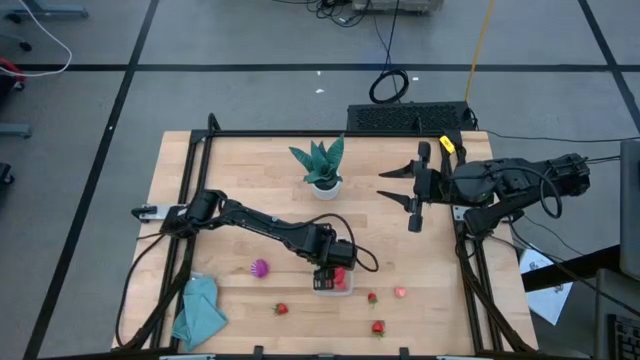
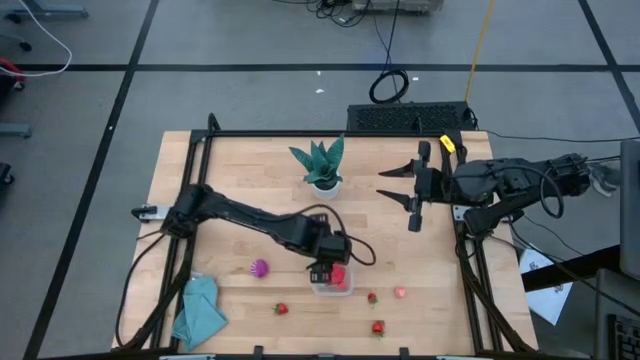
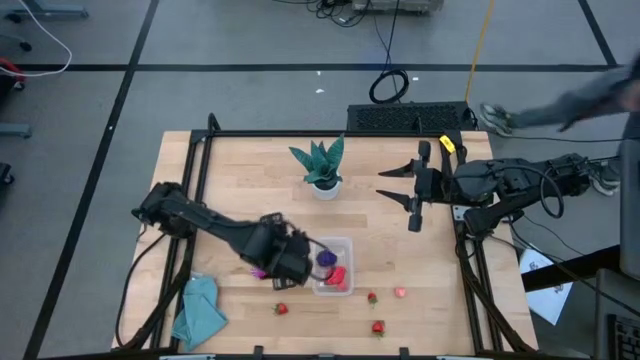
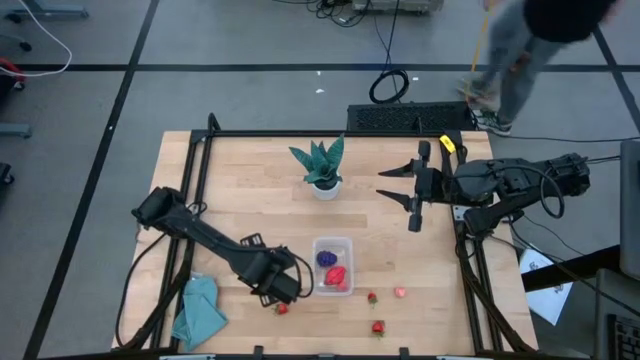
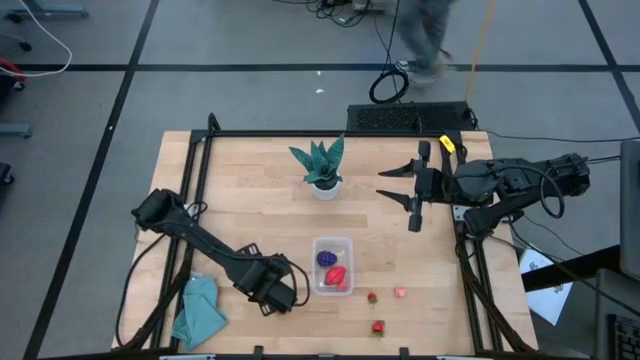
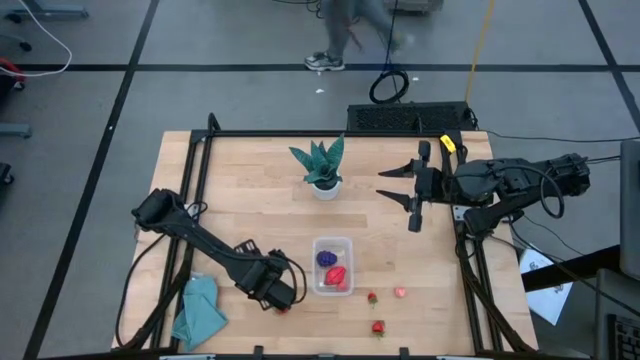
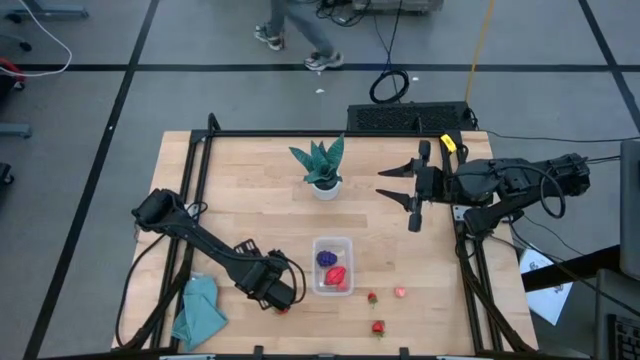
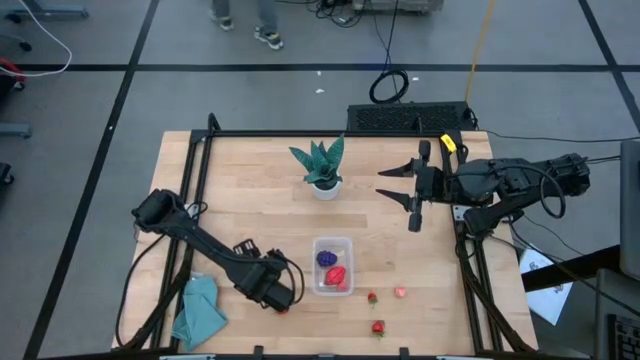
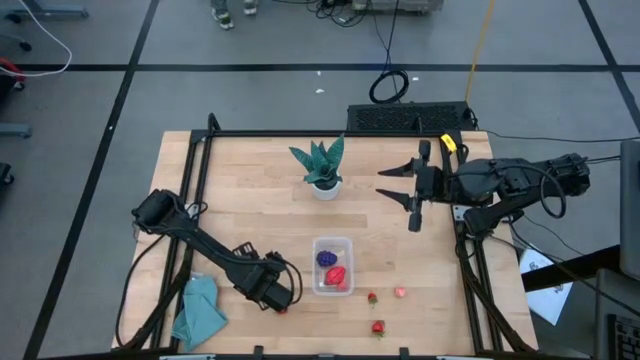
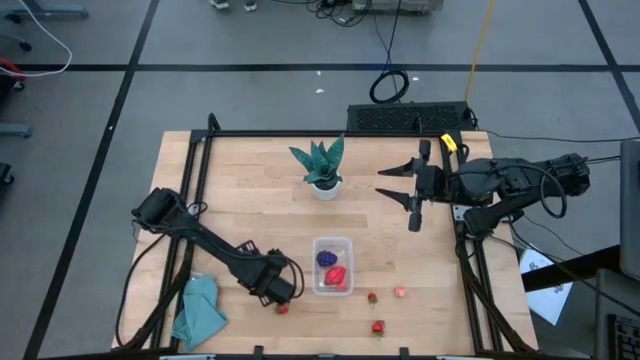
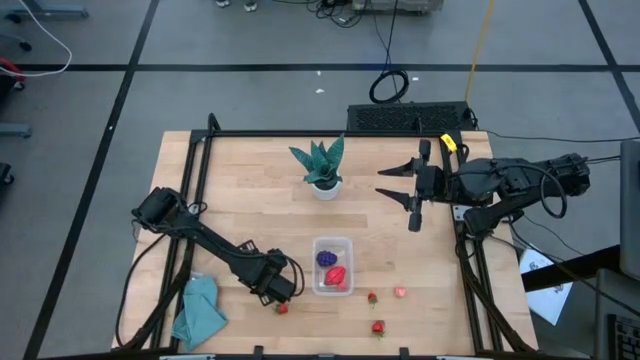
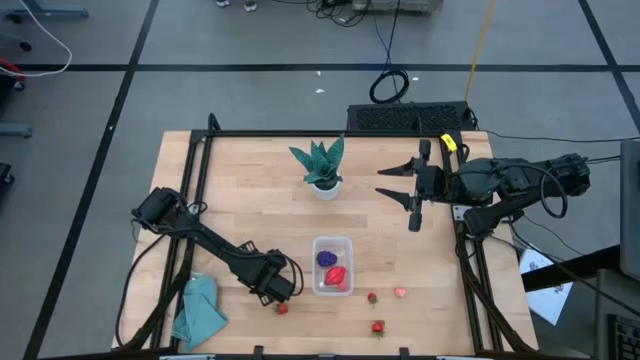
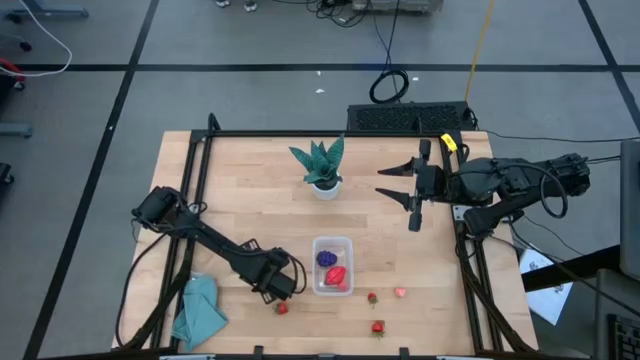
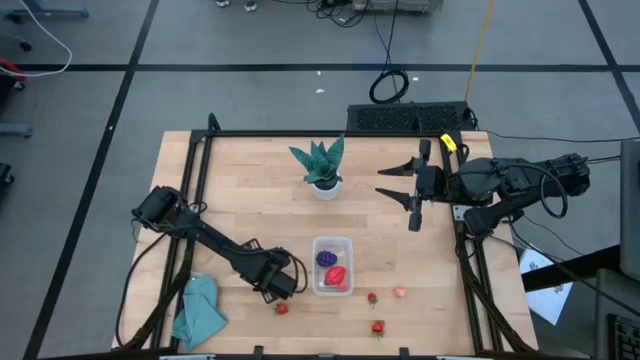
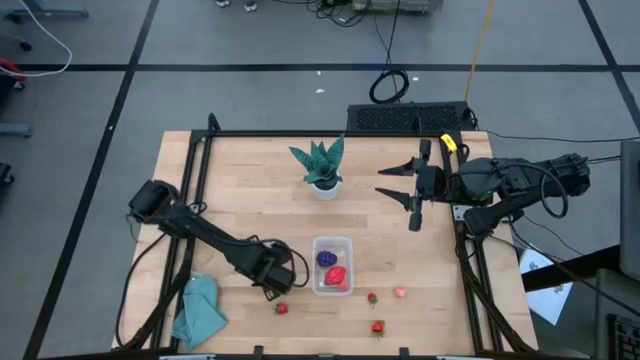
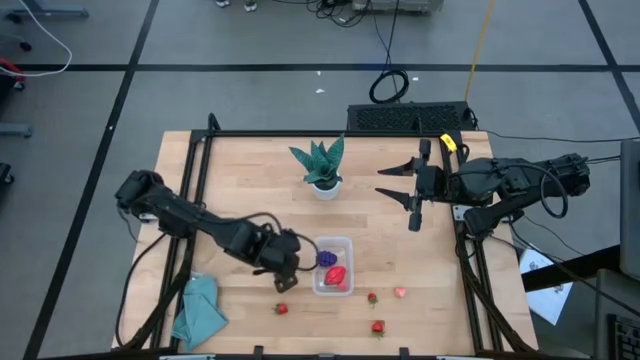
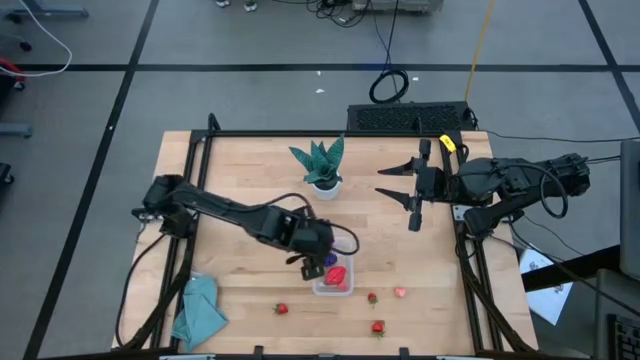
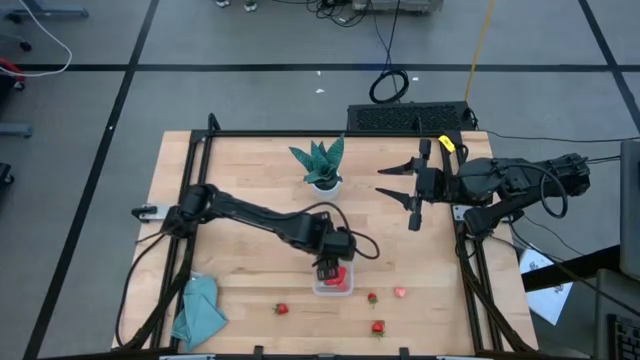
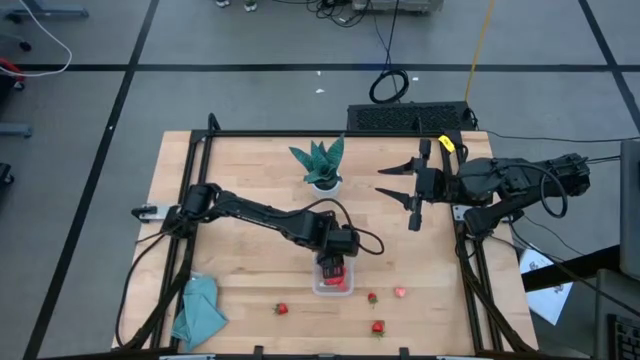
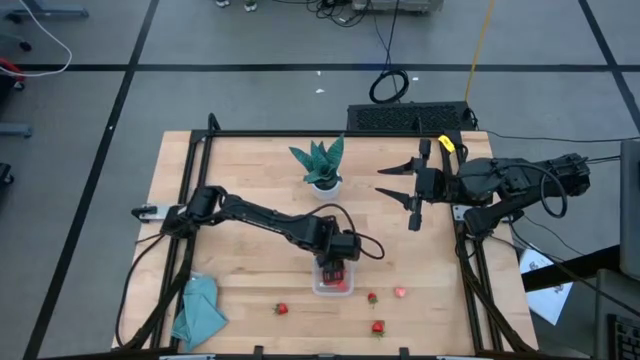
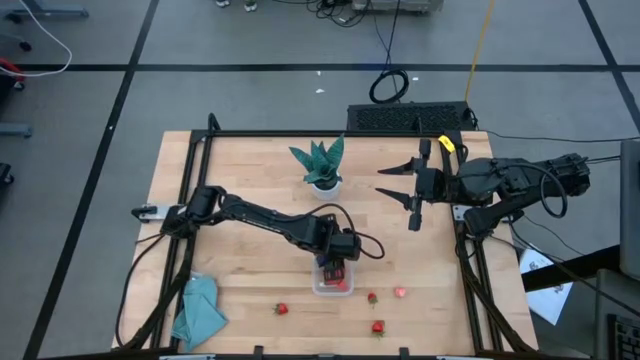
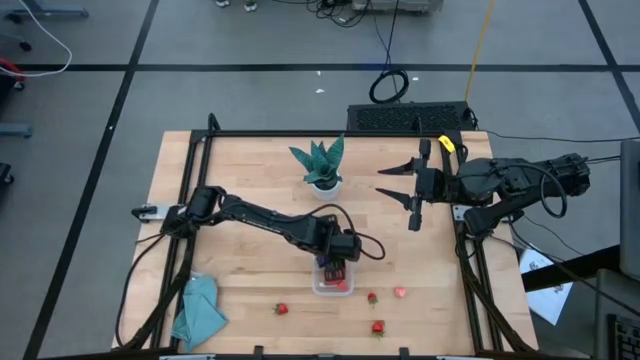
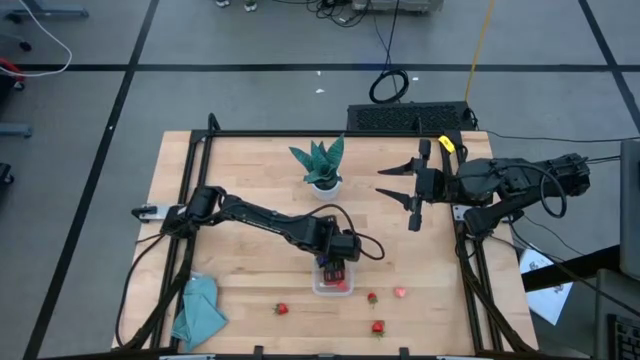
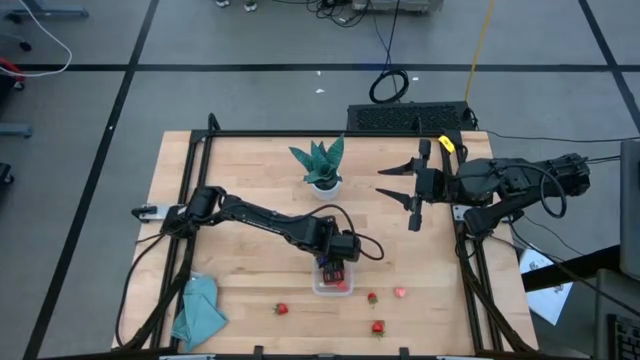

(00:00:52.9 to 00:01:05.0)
Task: Pick and placing Produce into tupperware
Put the purple onion into the transparent bin

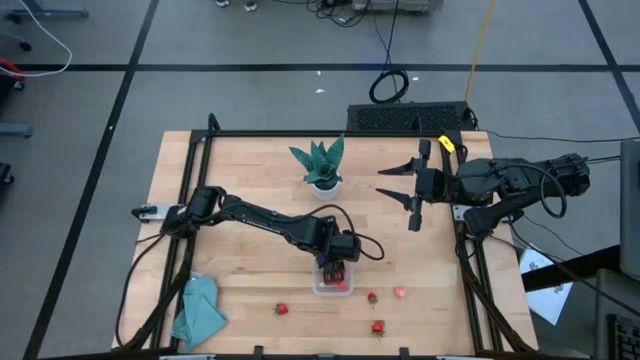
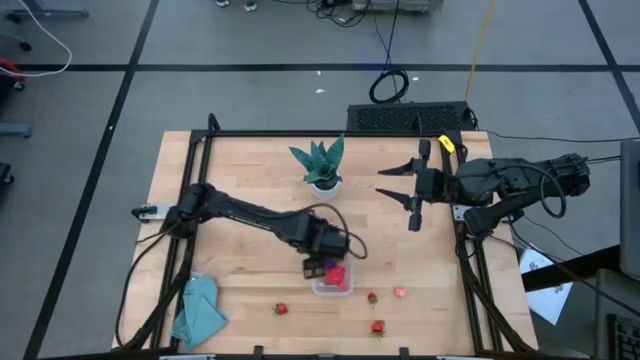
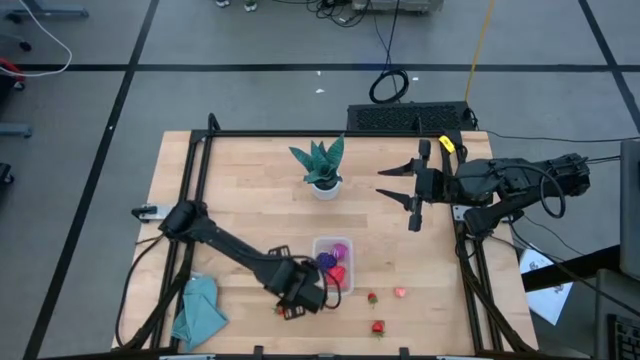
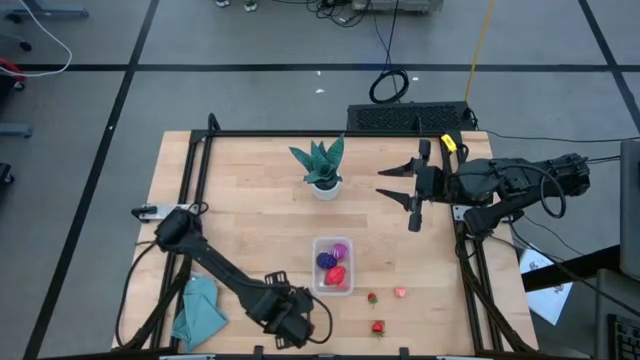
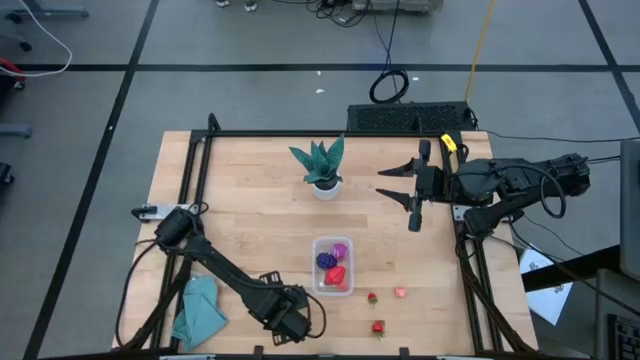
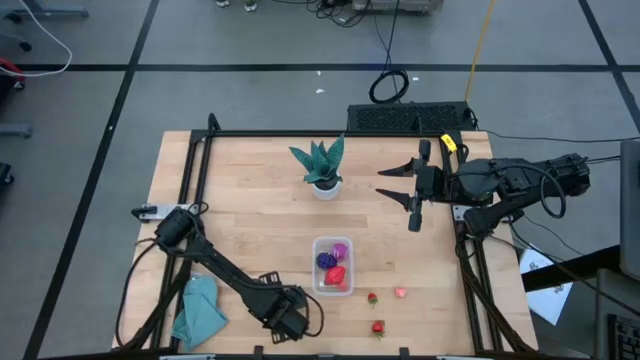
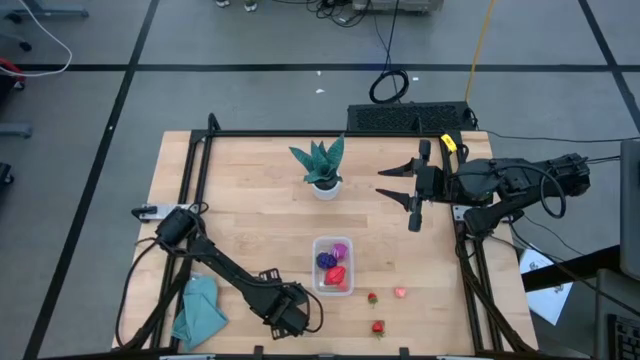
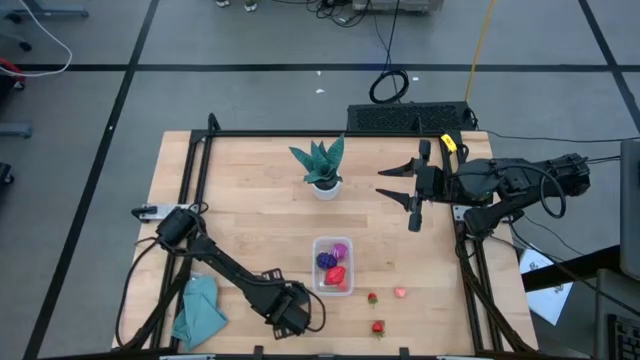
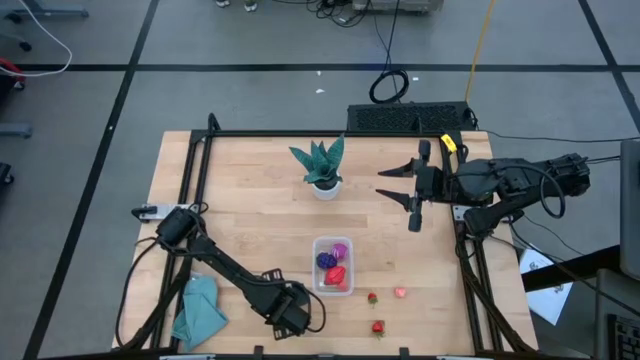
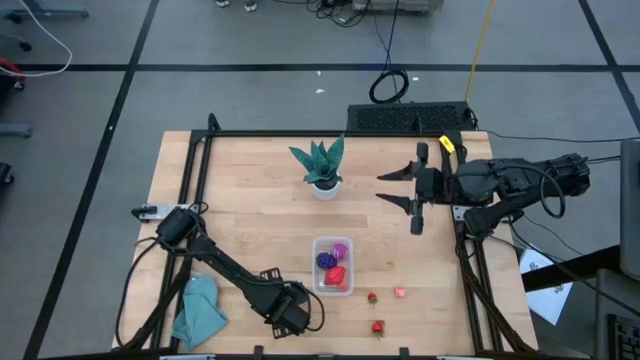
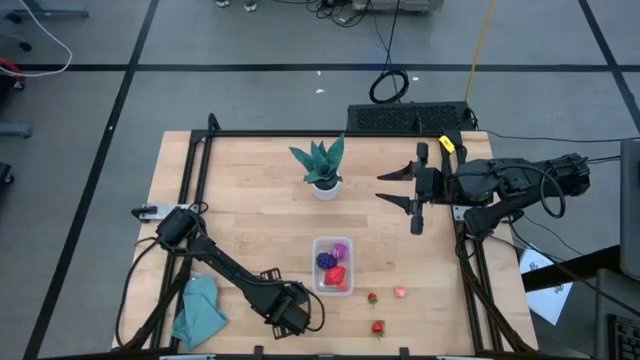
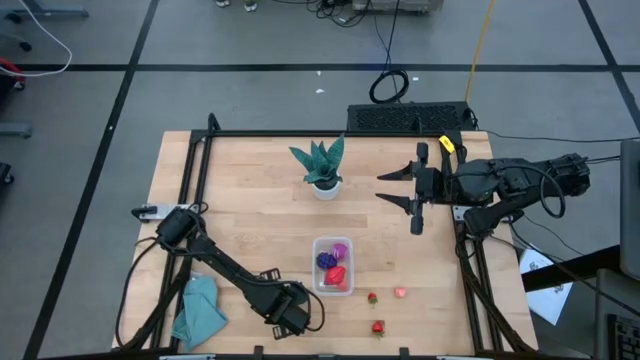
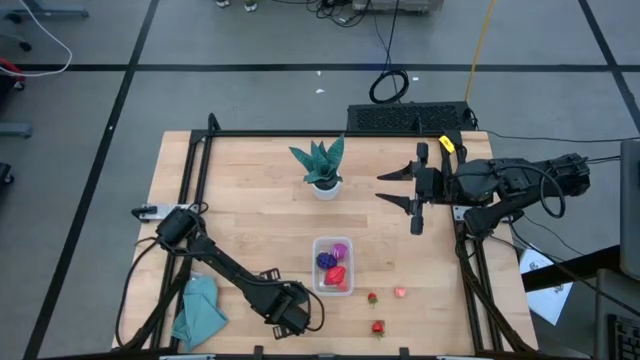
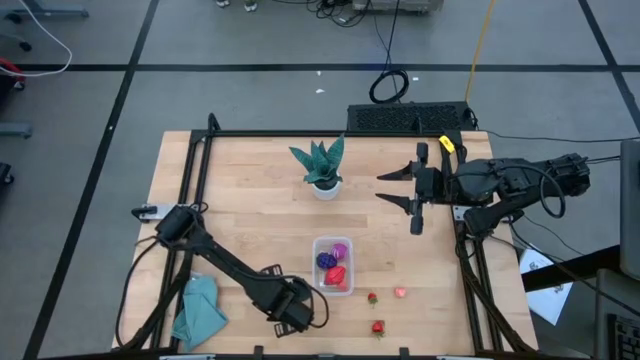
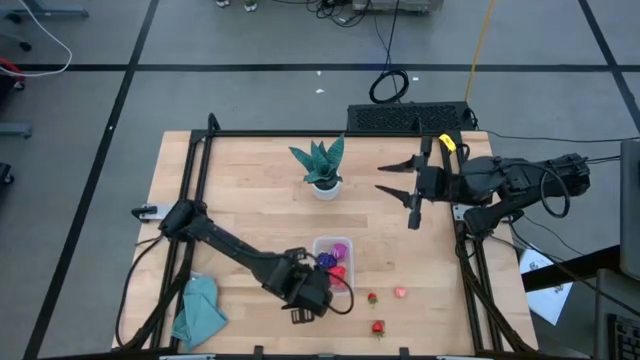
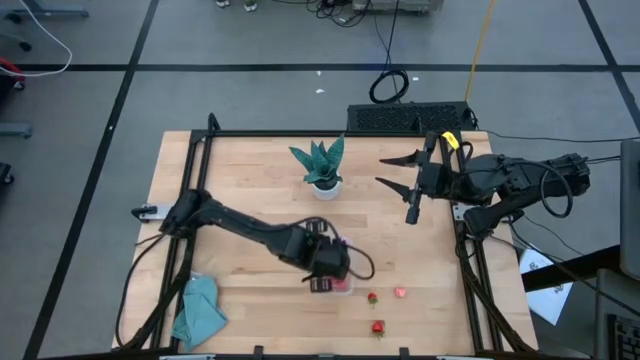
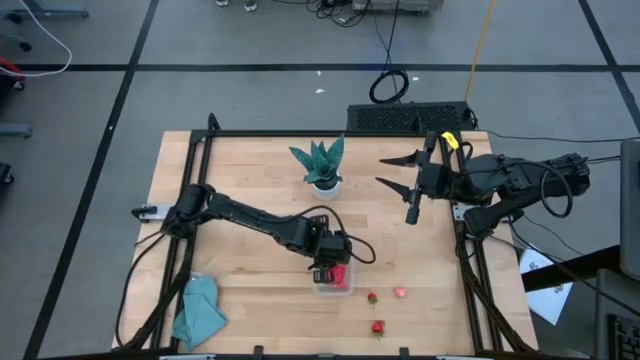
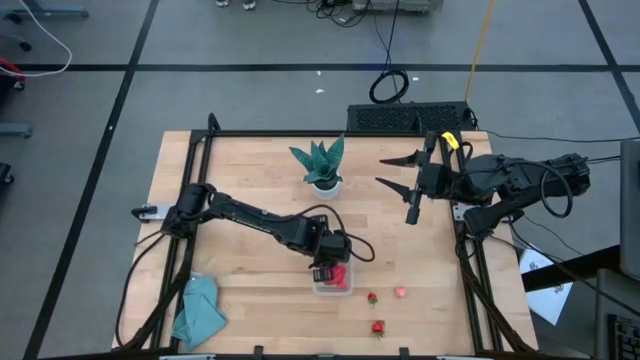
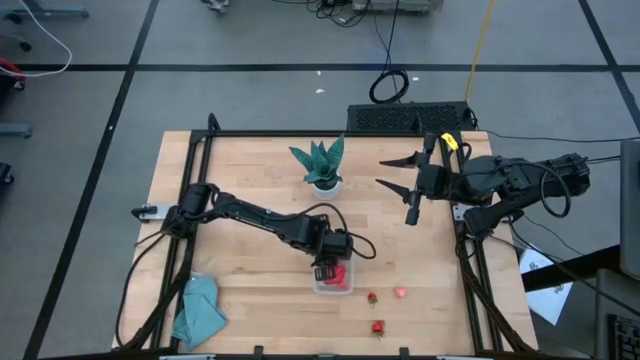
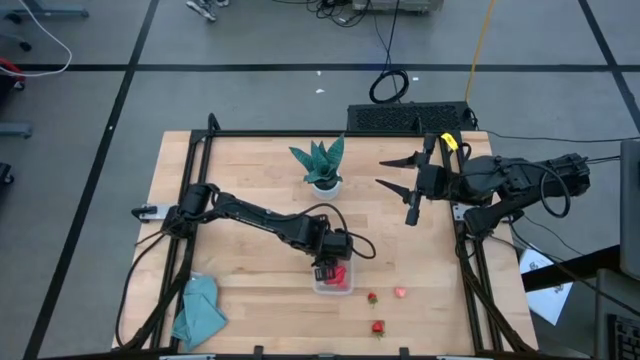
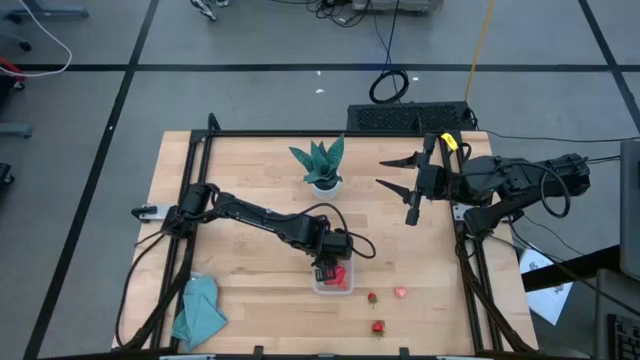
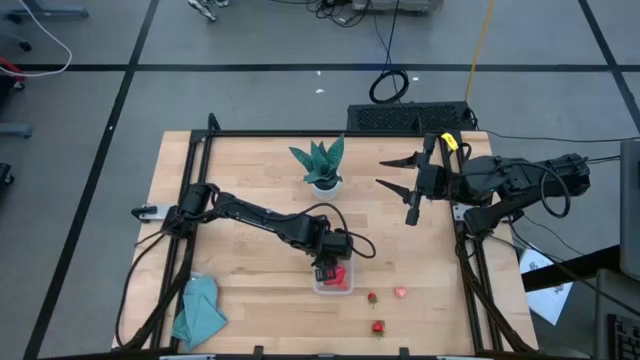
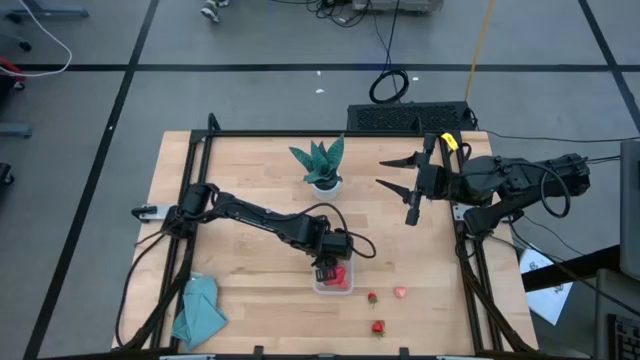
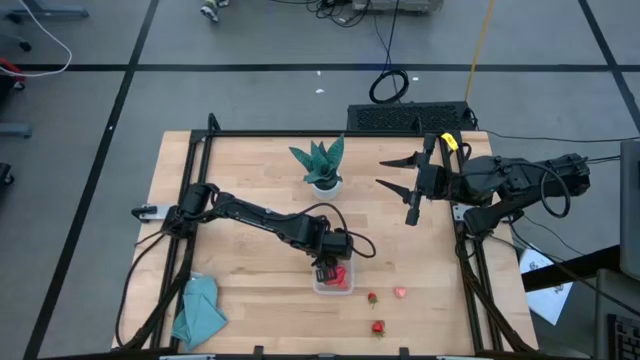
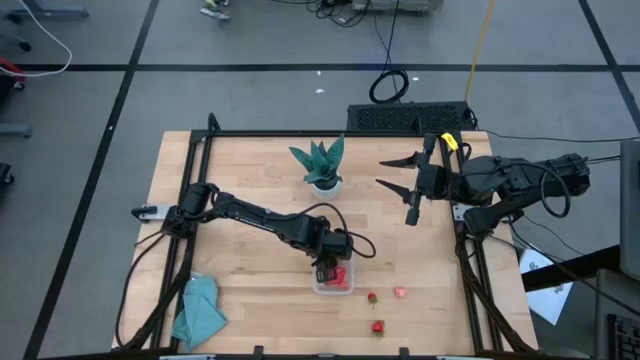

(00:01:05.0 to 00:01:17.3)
Put the top left red strawberry into the transparent bin
